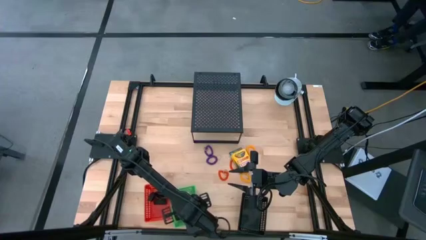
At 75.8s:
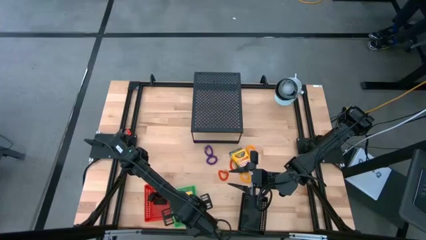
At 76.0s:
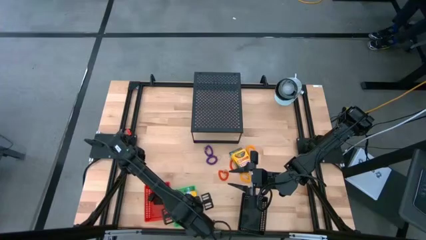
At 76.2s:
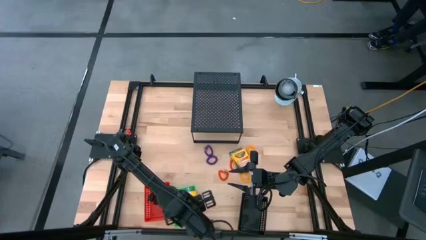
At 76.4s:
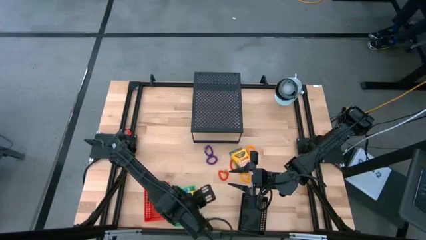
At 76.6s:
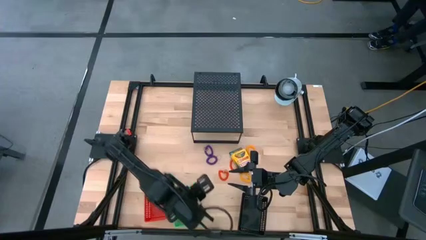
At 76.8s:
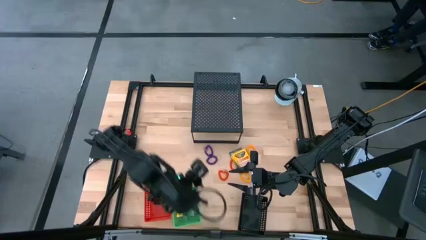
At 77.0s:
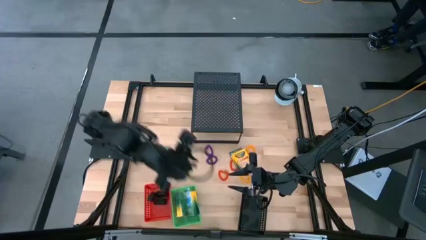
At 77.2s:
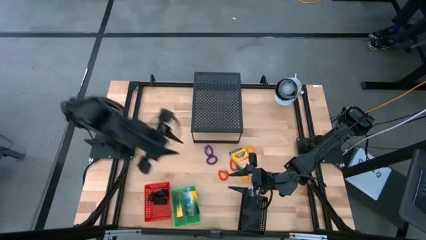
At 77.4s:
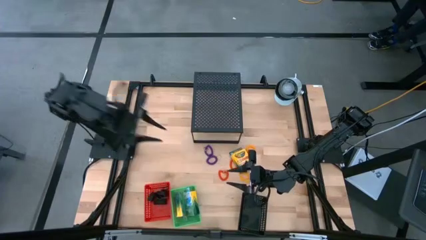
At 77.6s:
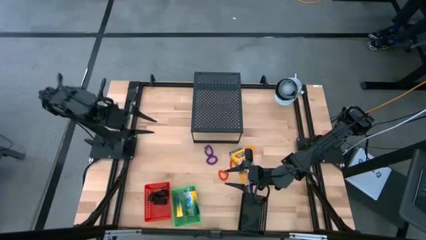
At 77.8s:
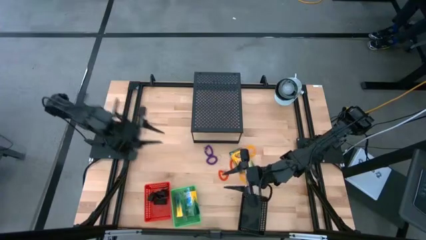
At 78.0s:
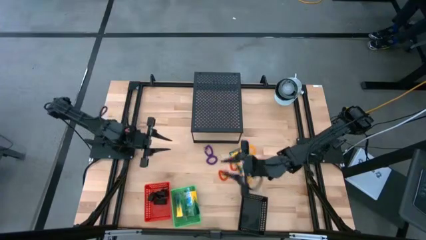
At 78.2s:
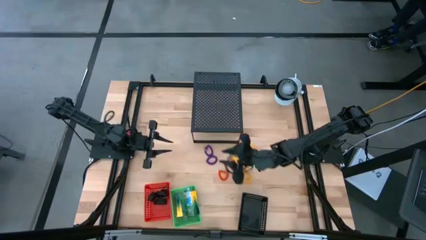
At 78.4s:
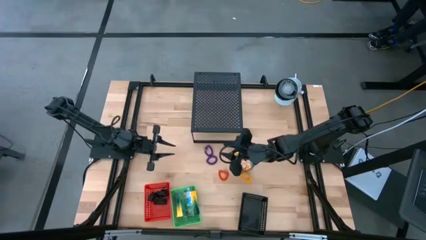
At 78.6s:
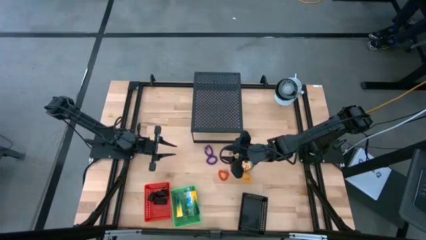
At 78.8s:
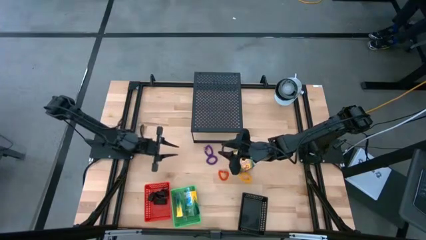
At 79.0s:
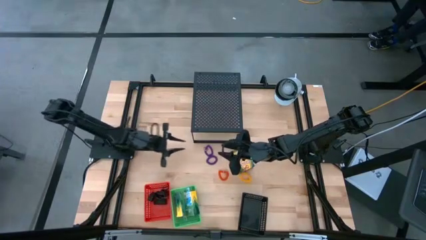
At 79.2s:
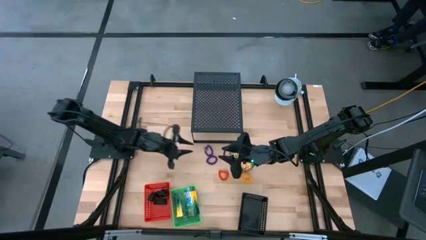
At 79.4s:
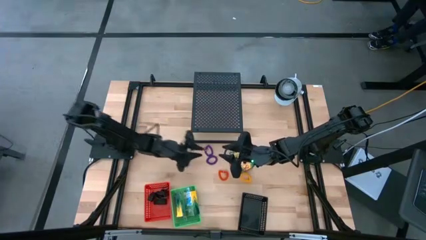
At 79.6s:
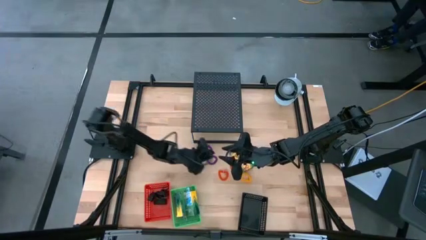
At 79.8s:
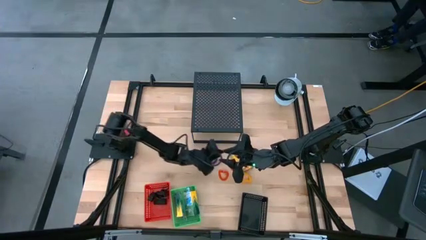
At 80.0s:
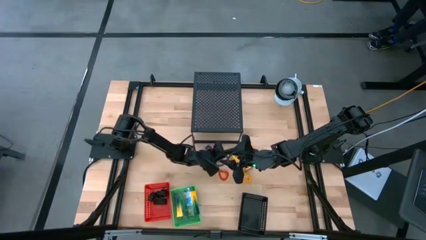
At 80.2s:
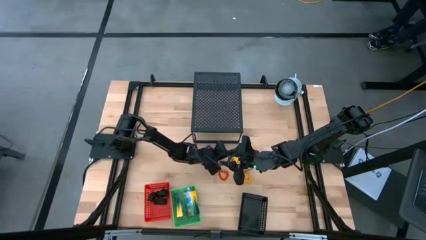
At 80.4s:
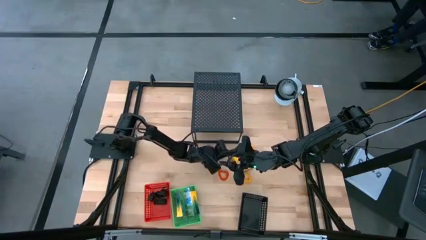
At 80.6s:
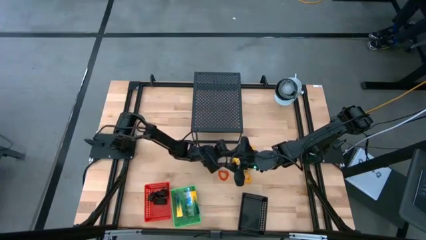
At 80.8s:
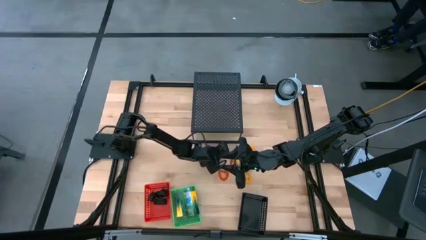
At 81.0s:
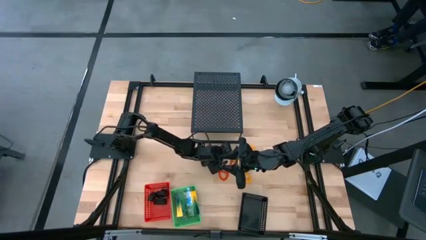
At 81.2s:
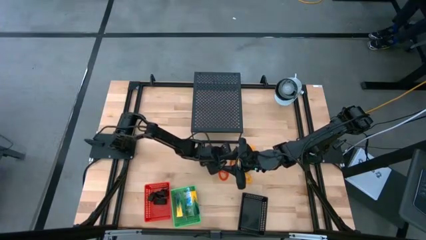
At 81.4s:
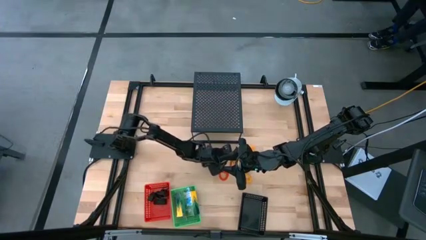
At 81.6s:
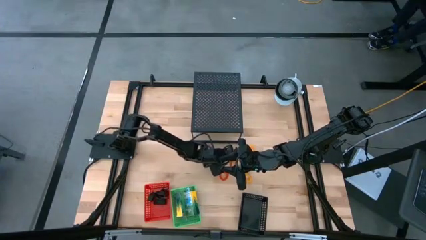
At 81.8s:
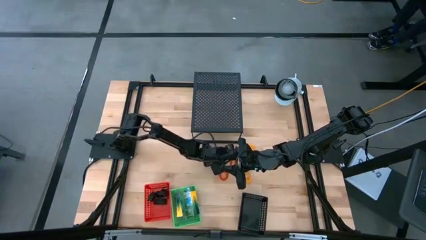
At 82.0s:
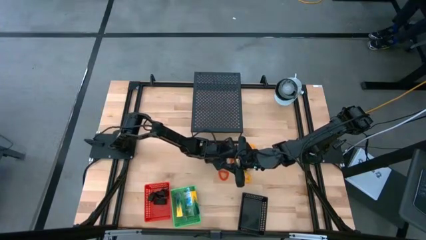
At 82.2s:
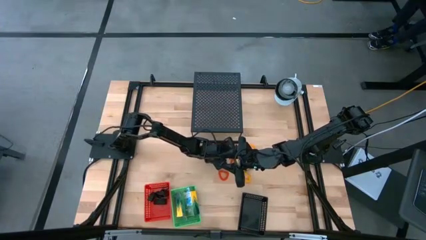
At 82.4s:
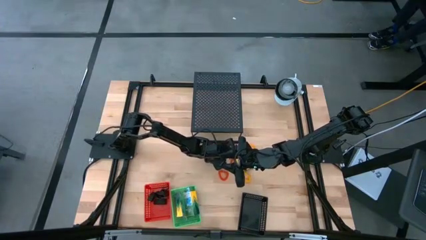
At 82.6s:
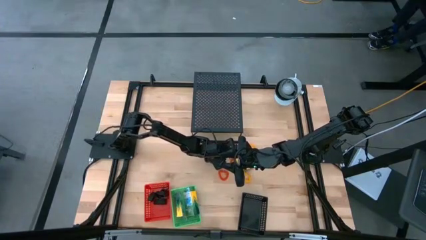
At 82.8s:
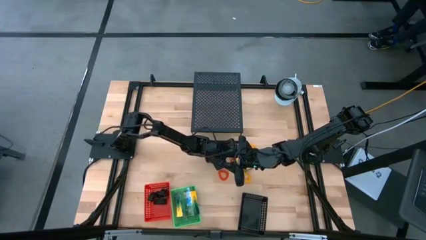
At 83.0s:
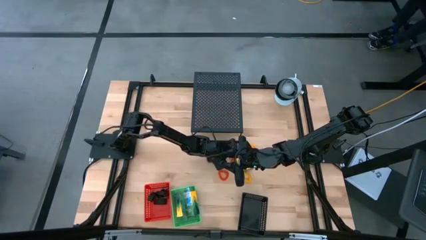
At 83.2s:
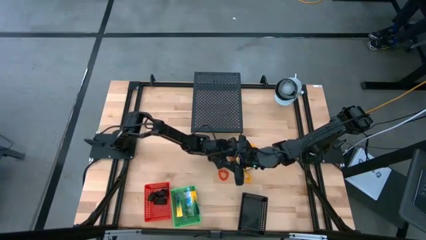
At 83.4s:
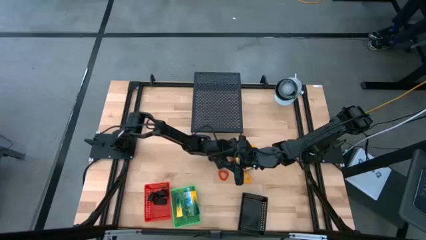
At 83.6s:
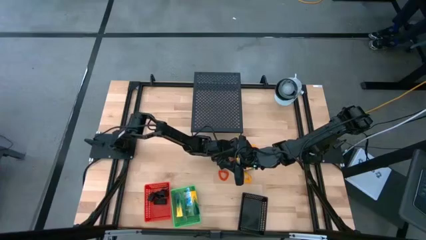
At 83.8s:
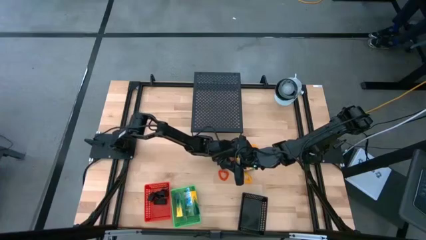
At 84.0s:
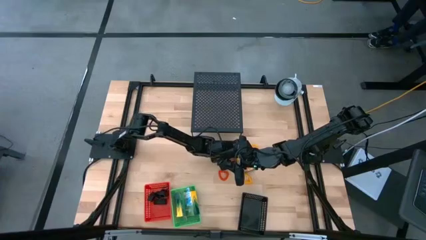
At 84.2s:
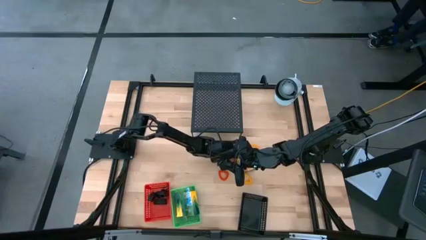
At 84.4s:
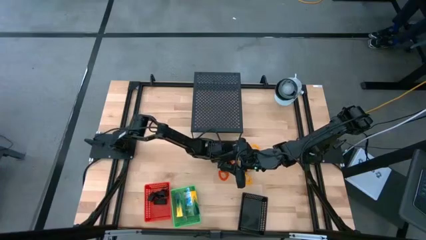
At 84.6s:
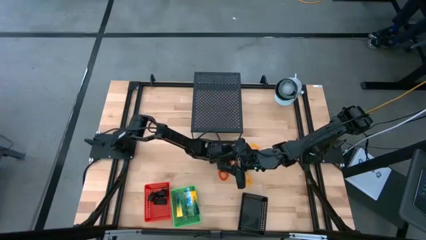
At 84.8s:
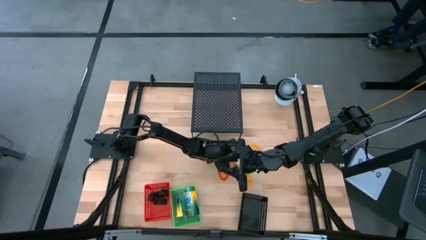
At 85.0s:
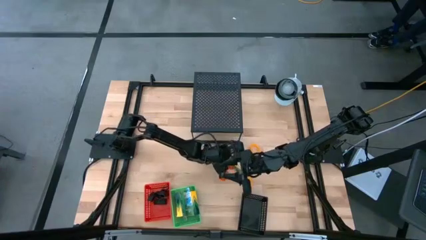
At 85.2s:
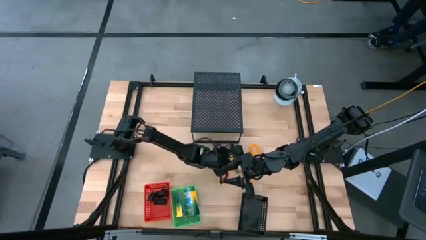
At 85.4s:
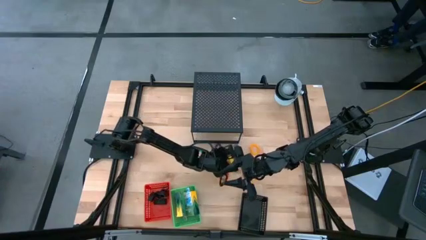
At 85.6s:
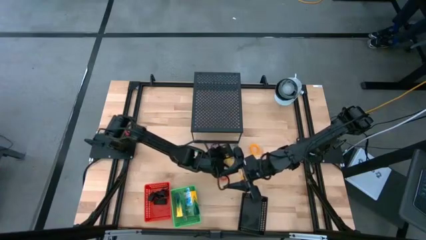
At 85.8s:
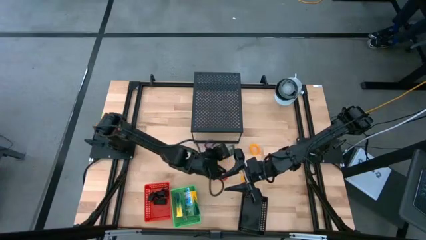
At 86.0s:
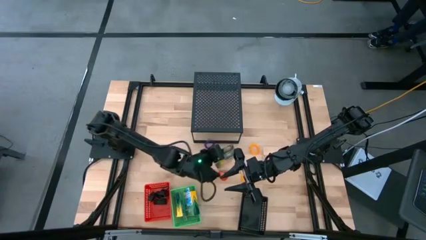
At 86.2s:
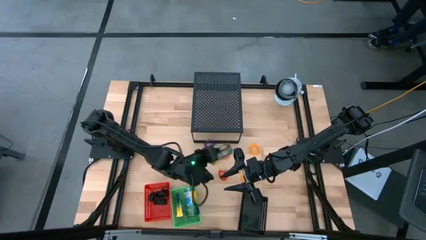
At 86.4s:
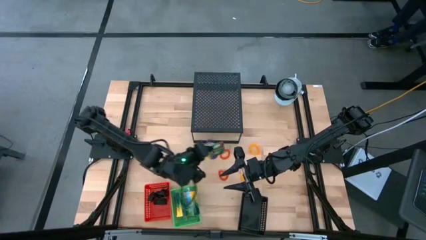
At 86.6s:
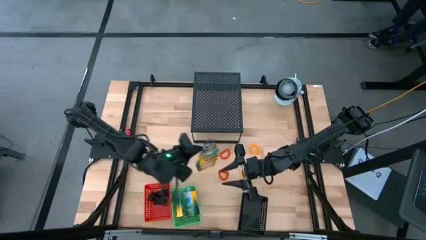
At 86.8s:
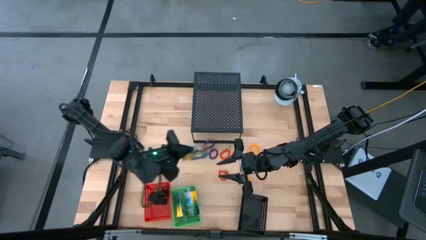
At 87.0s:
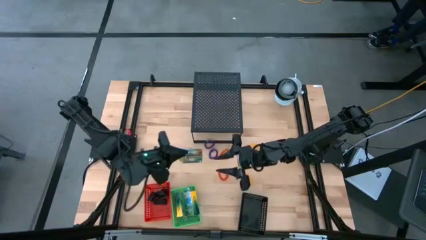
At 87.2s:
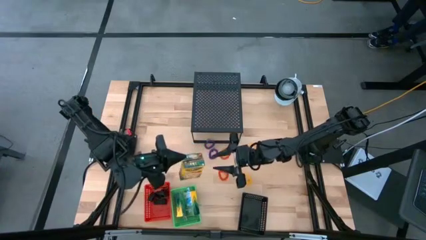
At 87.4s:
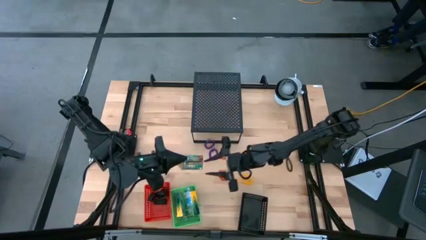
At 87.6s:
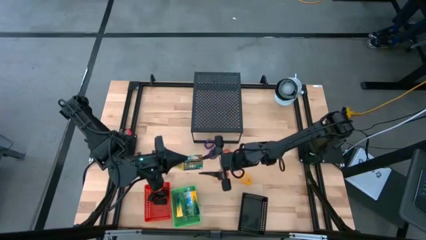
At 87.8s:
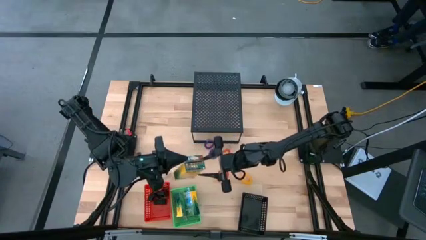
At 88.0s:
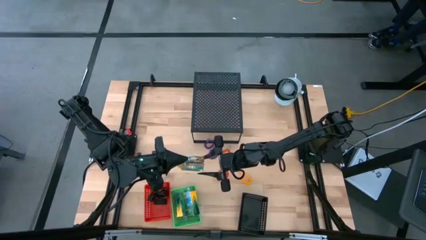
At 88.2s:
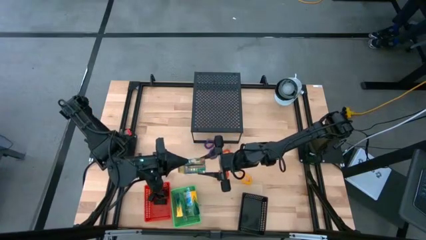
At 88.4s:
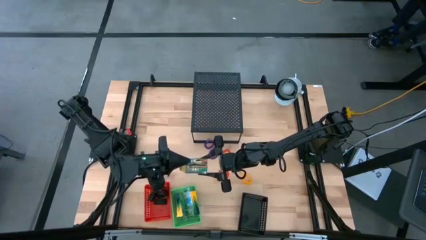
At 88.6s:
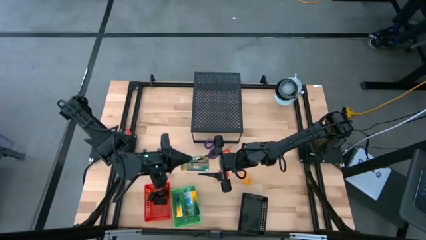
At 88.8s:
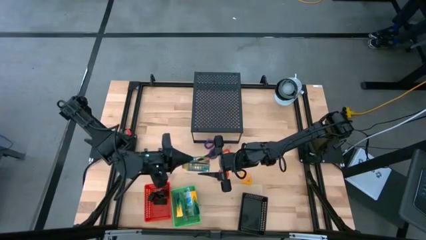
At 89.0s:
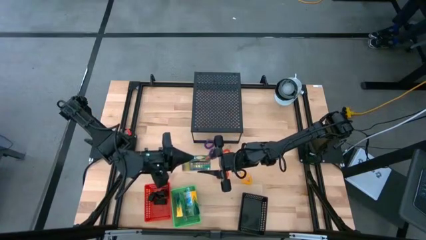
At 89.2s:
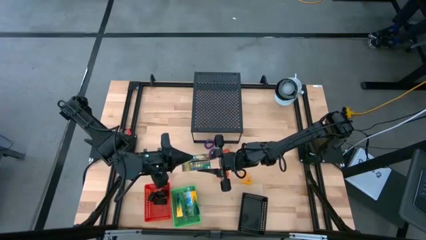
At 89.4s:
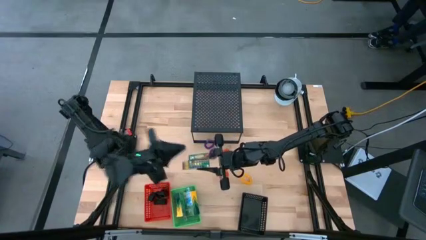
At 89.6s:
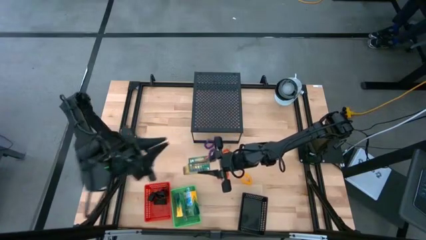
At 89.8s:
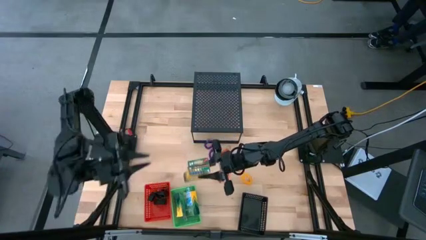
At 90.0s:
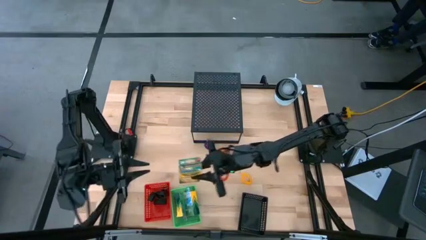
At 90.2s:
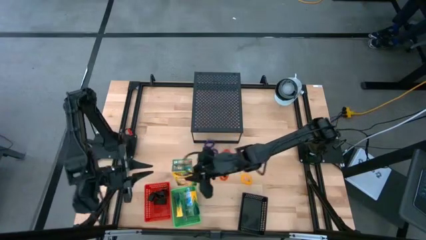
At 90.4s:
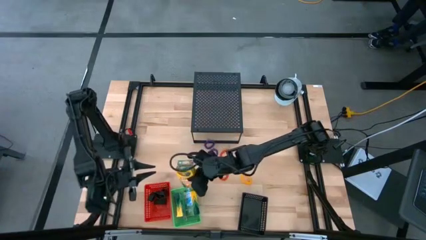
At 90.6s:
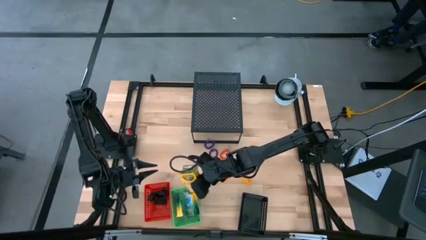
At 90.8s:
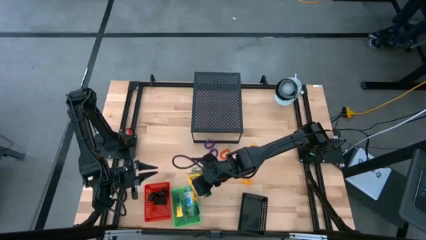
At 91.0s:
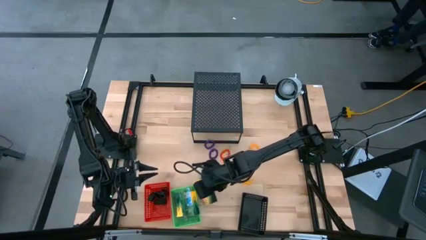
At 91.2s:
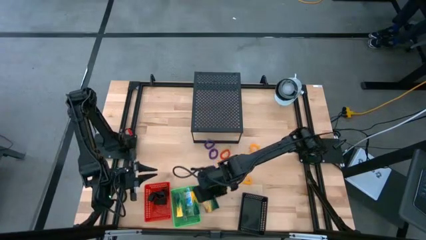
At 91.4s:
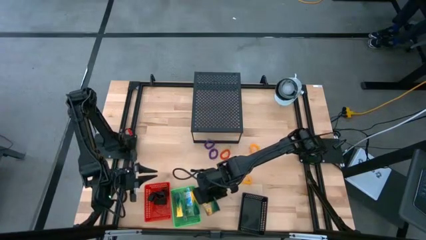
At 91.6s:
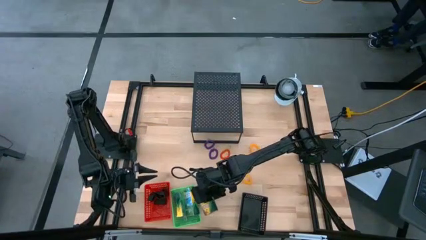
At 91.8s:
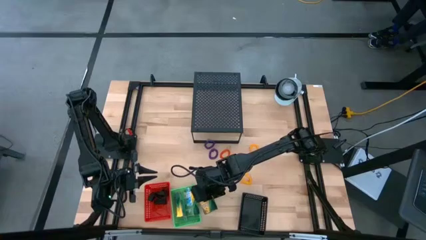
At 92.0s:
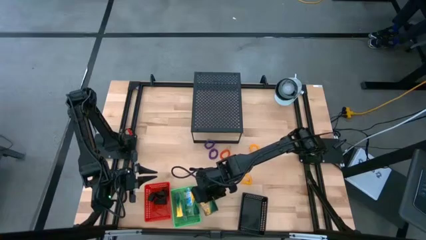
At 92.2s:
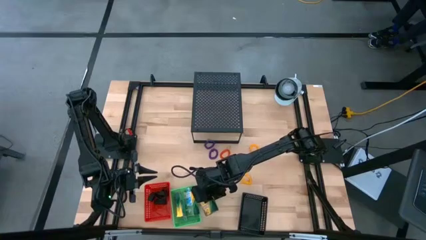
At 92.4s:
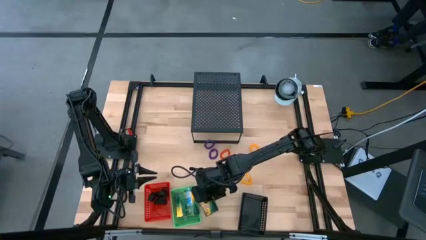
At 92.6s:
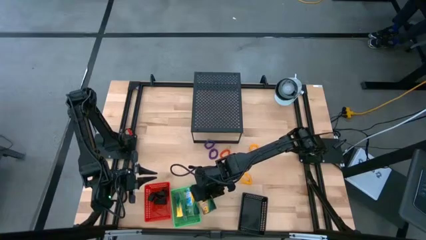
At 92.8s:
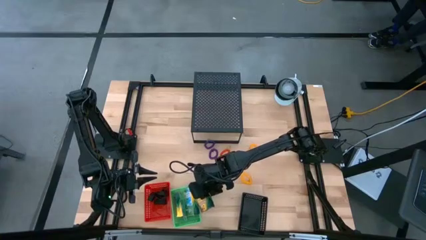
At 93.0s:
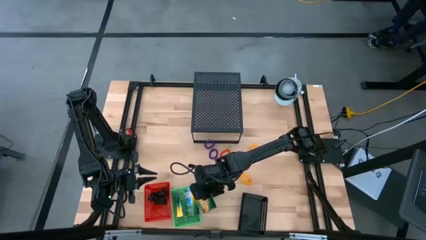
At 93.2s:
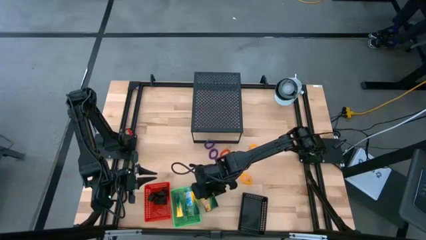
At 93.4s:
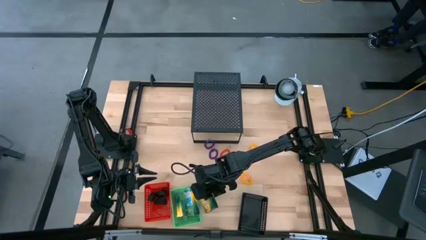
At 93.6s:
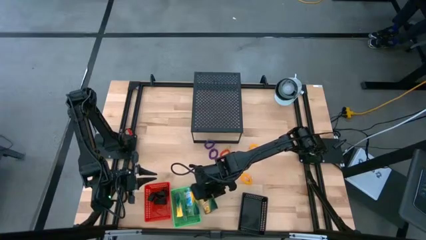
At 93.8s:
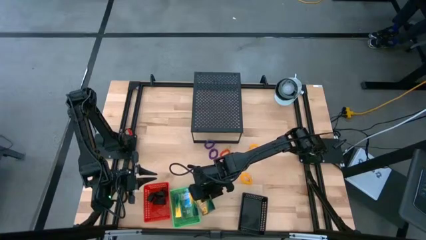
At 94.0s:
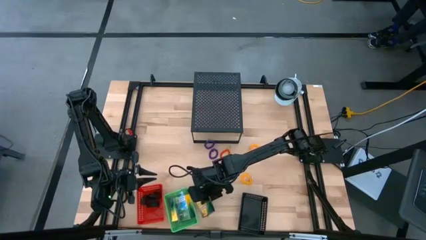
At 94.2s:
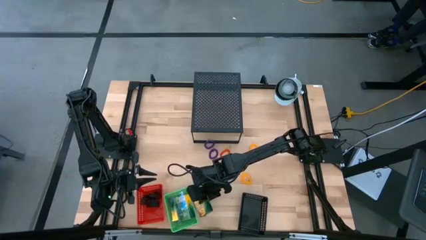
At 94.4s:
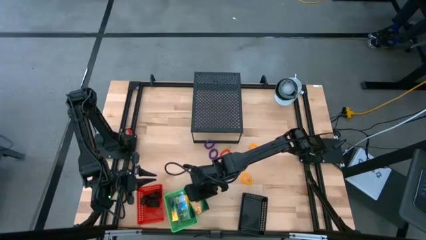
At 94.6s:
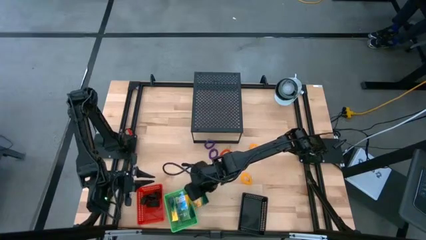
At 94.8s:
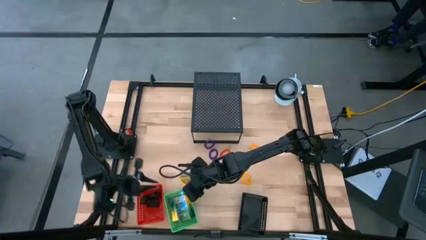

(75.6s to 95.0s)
Task: Pick & Place Office Desk Supplies
Put the crayon box into the green bin
